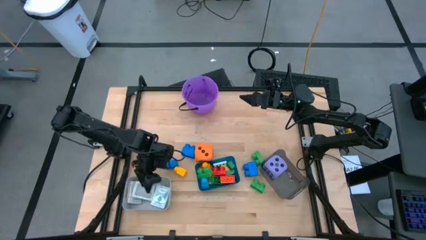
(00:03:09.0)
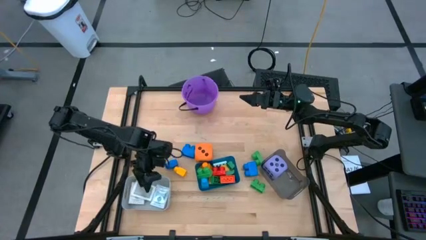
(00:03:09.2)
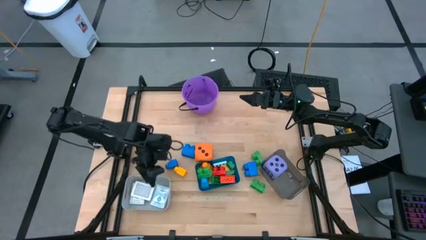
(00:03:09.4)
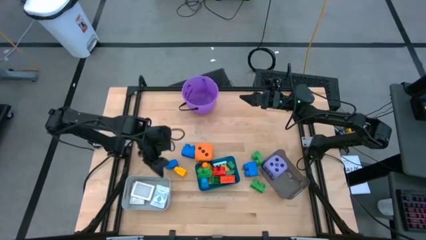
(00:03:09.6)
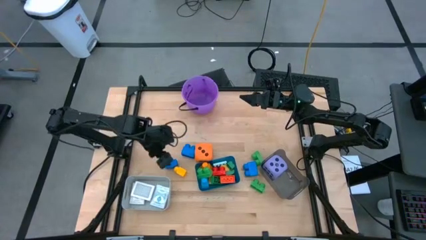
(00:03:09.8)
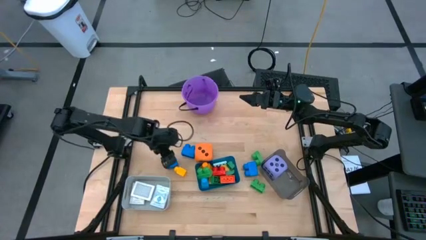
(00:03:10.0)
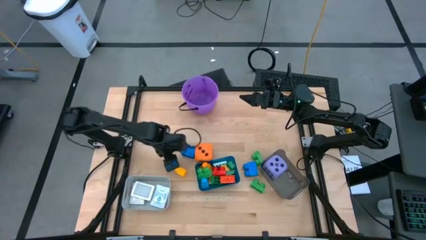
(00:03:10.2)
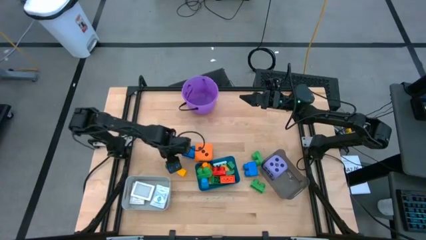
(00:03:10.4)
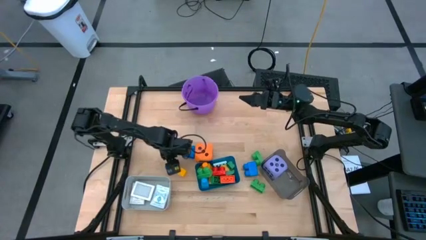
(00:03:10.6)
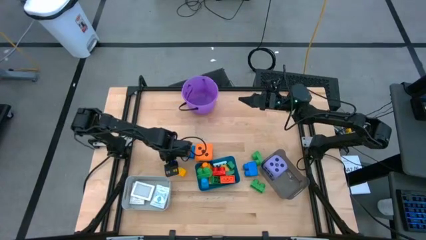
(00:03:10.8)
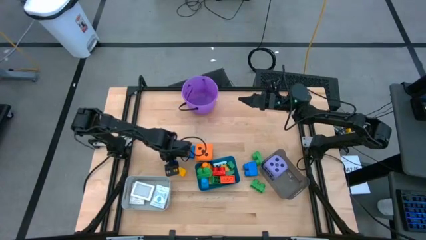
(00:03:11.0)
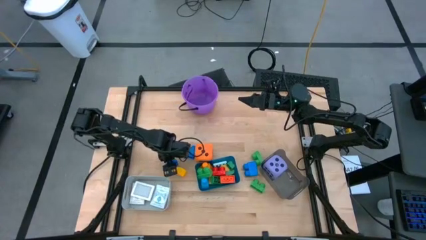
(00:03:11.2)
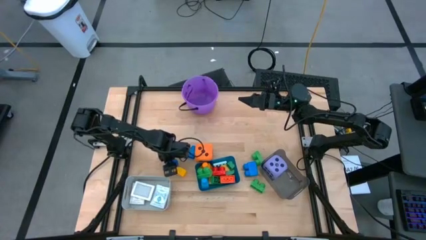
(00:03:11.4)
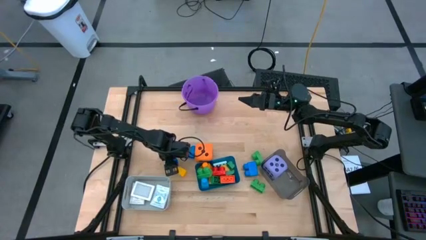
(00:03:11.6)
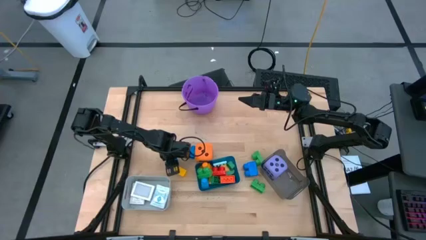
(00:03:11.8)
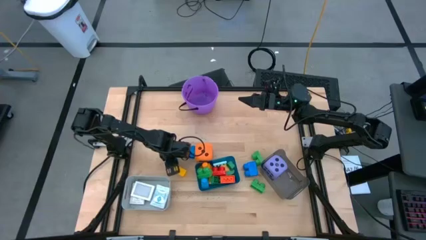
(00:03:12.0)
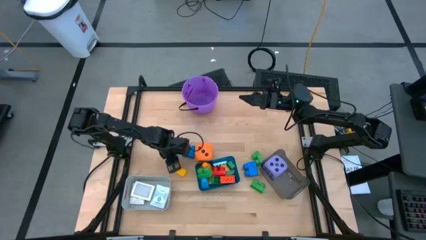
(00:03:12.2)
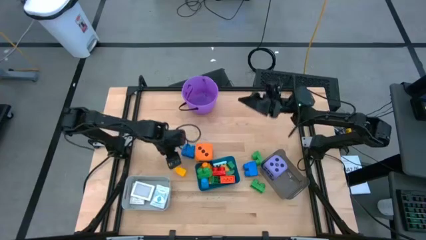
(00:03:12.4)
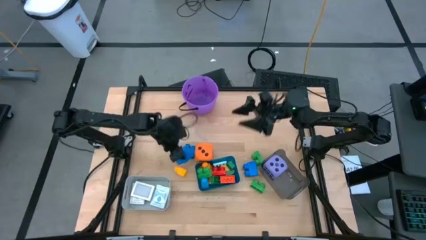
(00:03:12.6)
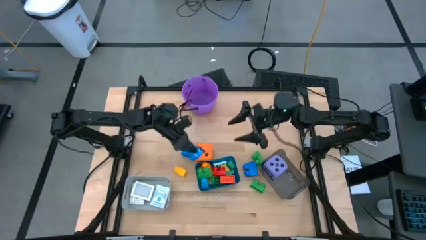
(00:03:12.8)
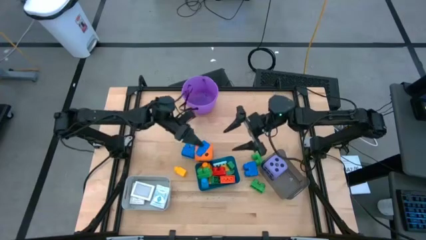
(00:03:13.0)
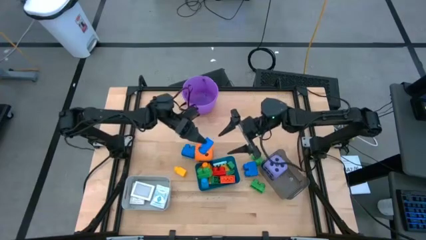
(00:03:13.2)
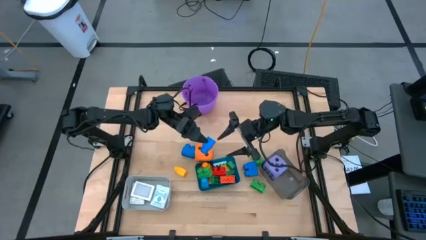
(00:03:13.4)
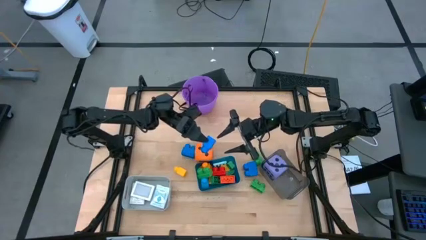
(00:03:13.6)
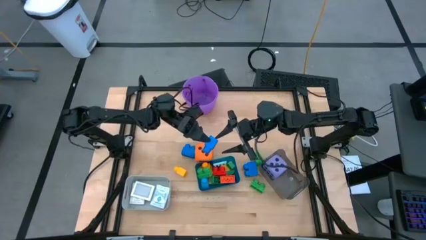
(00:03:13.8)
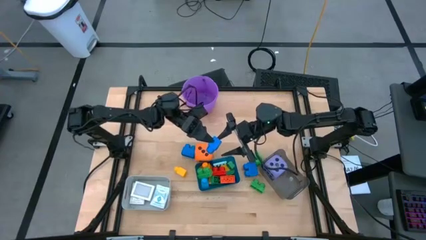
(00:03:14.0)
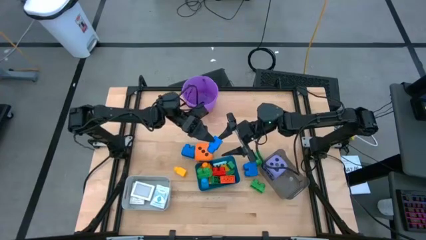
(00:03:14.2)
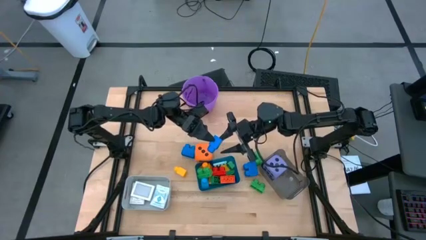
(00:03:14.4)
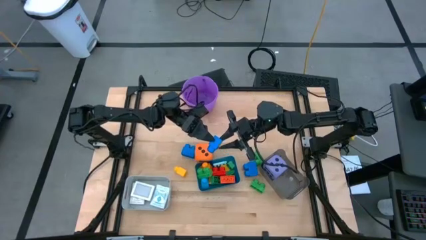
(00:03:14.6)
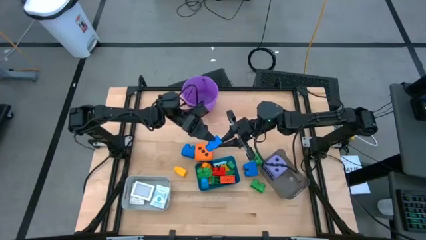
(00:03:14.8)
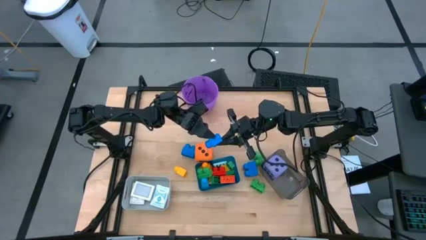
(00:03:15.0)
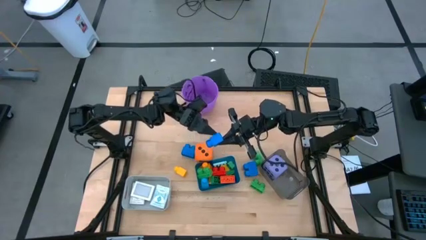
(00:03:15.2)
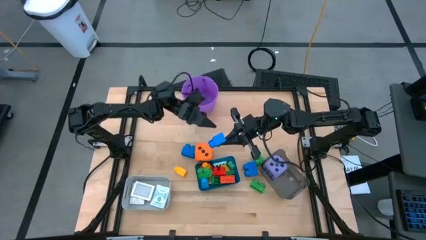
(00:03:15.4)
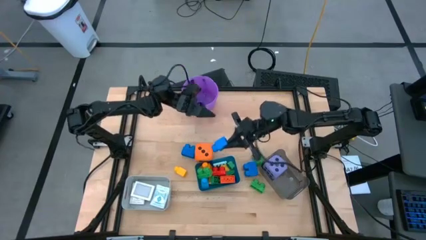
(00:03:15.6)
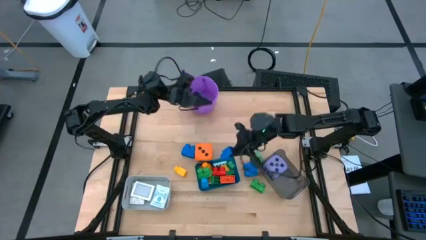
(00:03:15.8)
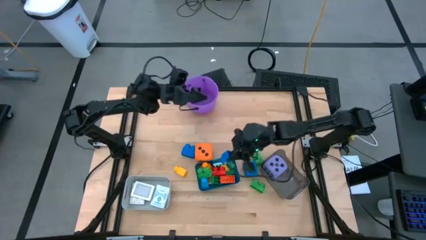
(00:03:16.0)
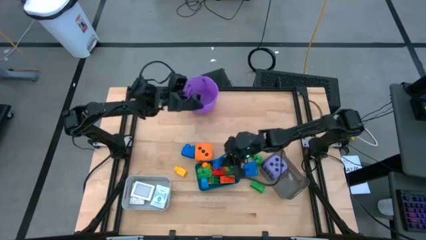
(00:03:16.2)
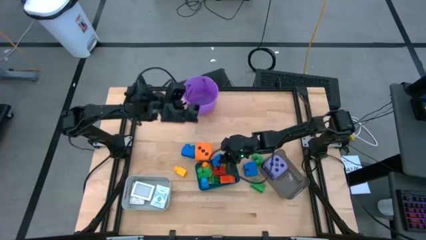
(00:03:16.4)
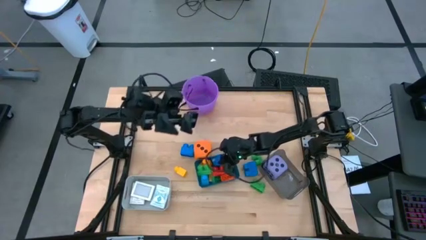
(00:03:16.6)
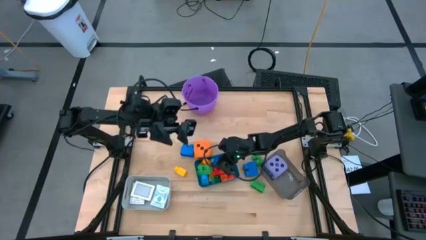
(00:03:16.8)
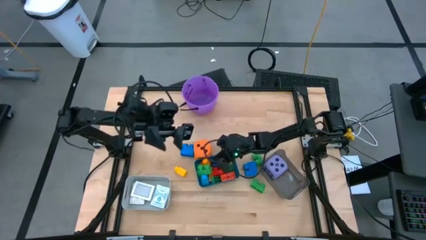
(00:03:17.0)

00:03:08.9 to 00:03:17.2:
Task: Pick & Place Toys
Put the blue game piece into the blue bin

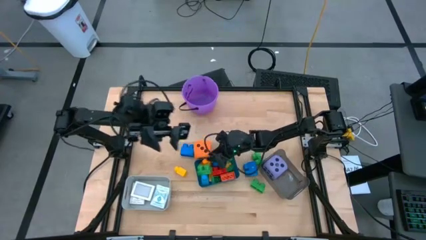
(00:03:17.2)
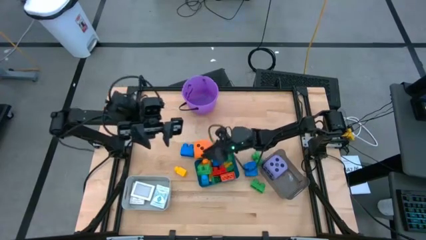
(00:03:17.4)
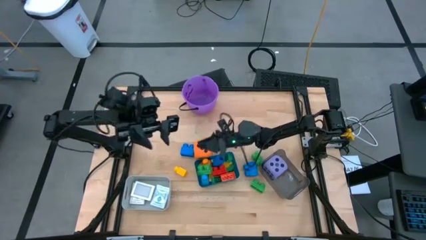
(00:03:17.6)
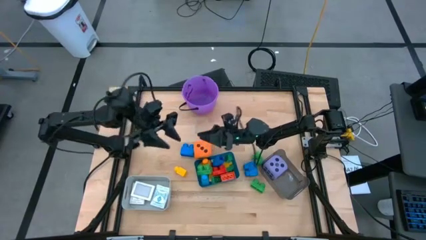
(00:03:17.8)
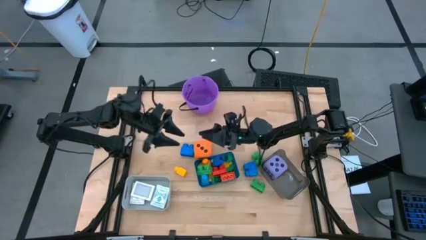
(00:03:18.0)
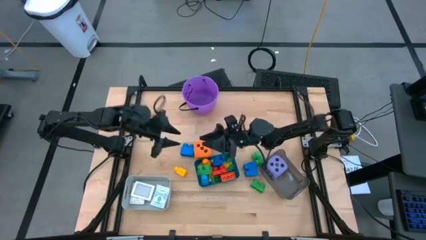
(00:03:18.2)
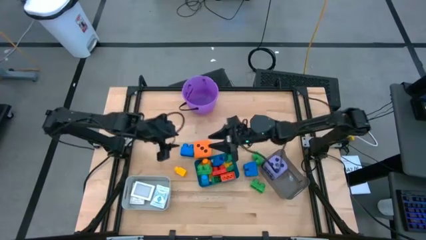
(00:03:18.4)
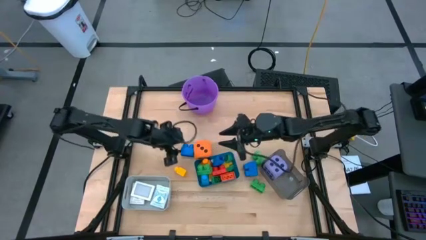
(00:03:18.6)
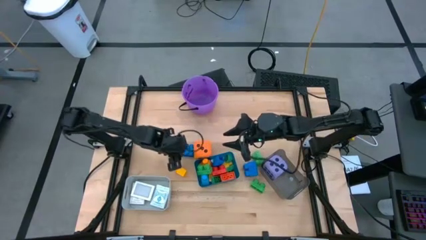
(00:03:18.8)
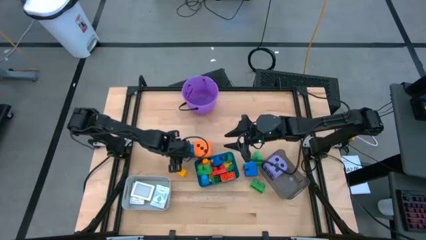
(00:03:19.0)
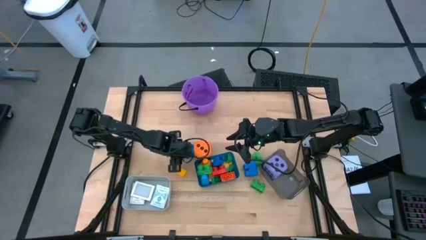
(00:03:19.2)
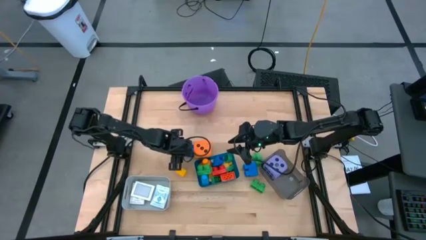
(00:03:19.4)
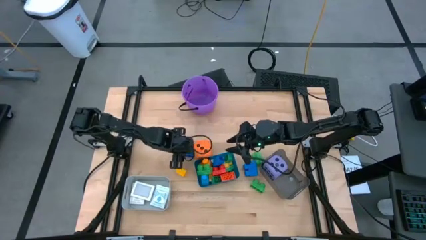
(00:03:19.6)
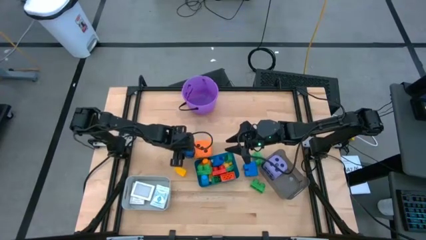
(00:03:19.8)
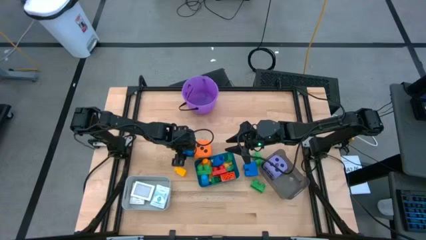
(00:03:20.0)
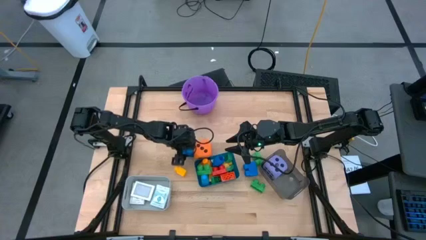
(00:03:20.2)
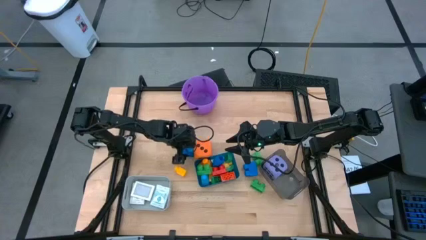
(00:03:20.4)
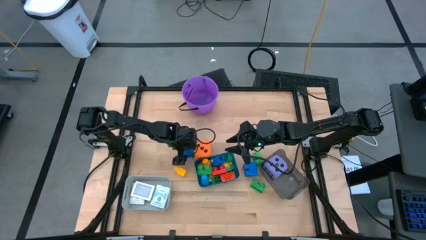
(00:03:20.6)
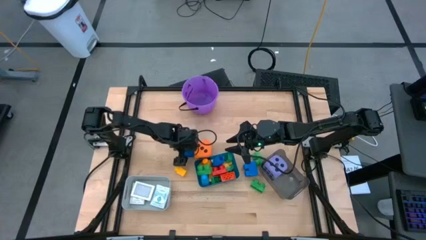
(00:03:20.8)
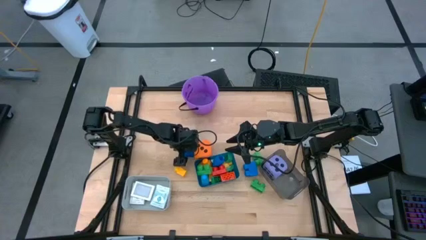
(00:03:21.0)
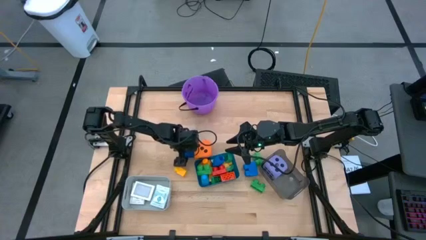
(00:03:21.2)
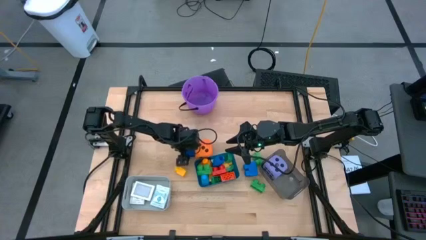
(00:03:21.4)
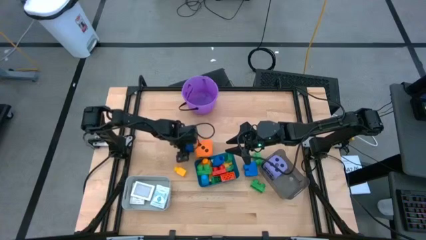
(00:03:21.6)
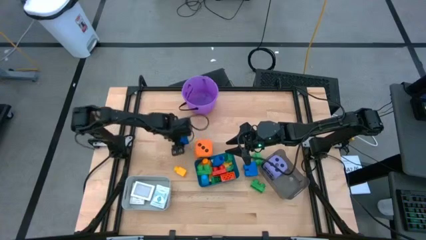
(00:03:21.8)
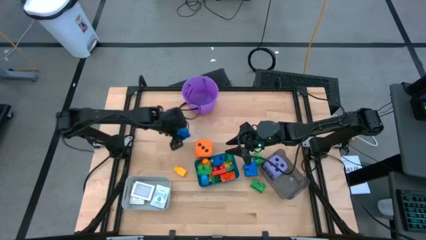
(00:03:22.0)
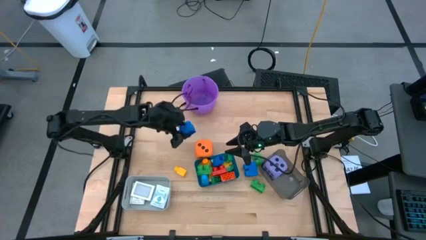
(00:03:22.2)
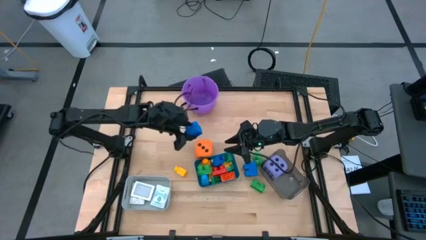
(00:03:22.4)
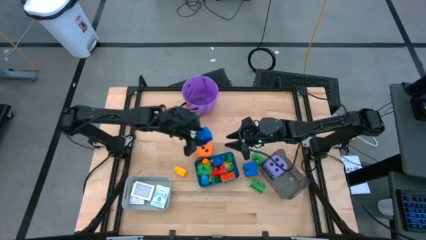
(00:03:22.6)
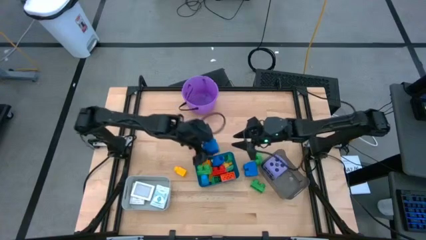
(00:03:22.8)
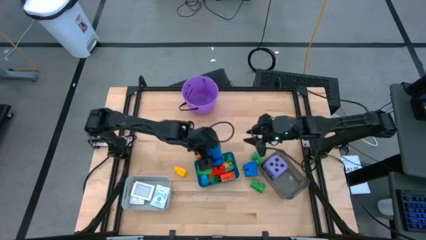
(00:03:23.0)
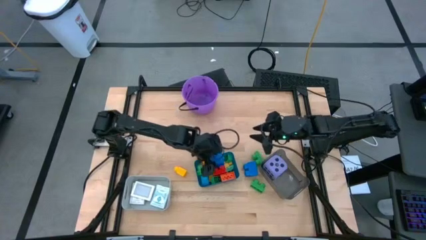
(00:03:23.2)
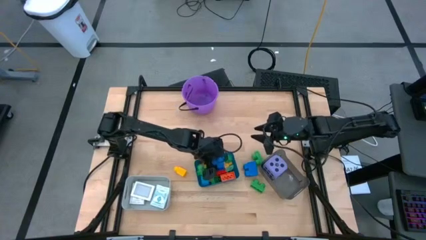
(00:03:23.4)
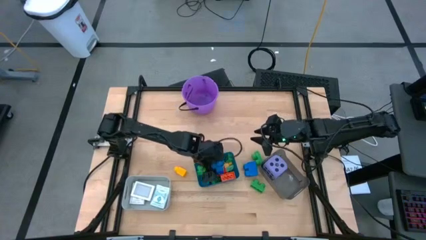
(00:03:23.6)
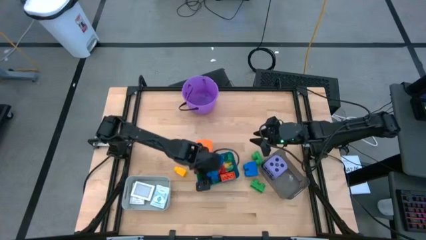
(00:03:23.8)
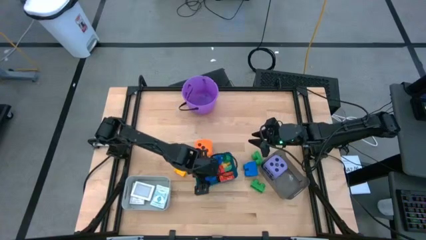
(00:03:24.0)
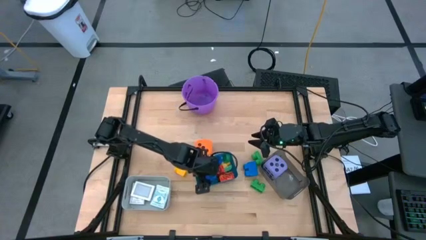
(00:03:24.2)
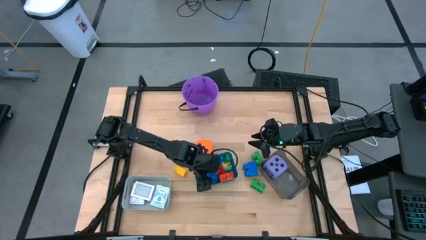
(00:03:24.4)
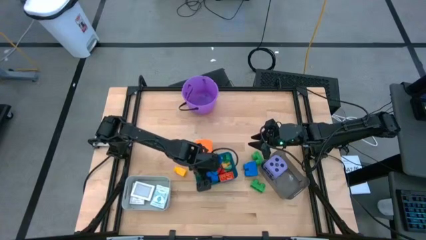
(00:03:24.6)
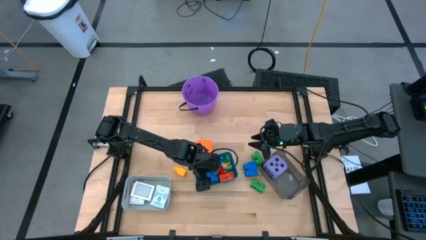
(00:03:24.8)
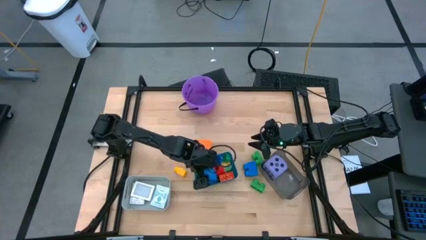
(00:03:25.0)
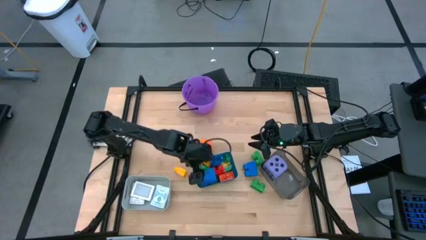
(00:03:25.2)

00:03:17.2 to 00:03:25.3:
Put the left blue game piece into the blue bin
